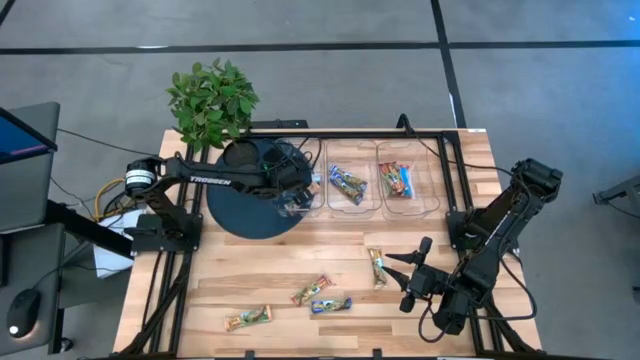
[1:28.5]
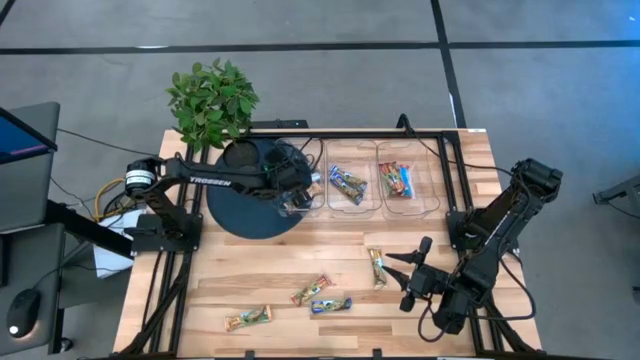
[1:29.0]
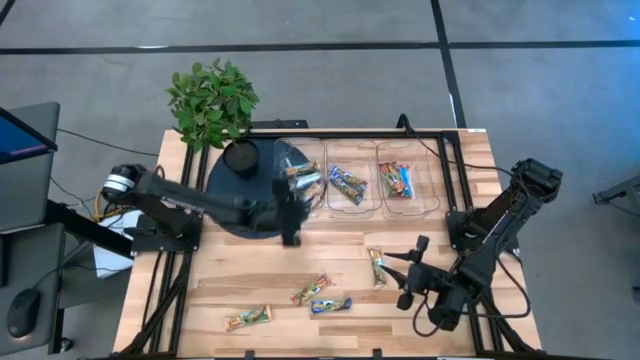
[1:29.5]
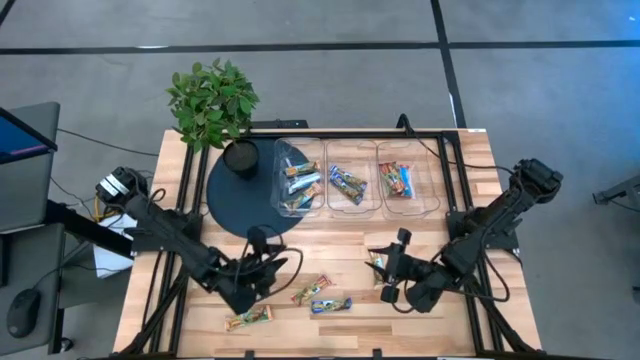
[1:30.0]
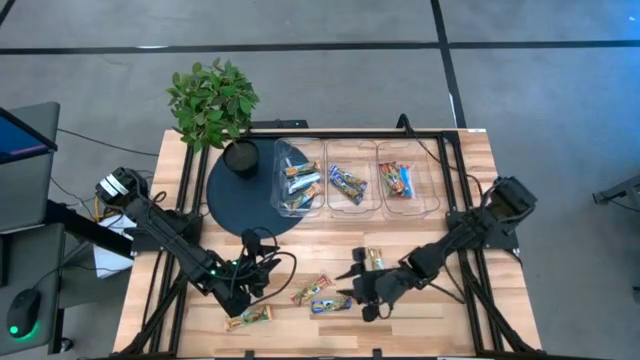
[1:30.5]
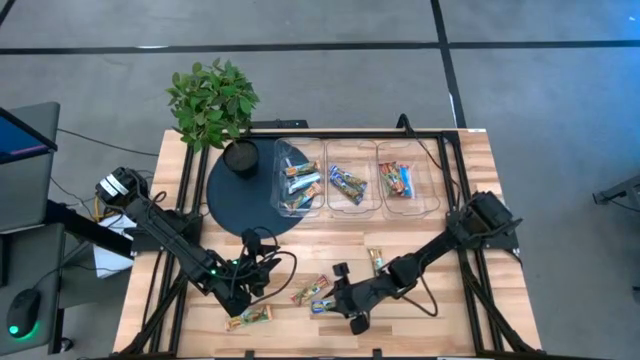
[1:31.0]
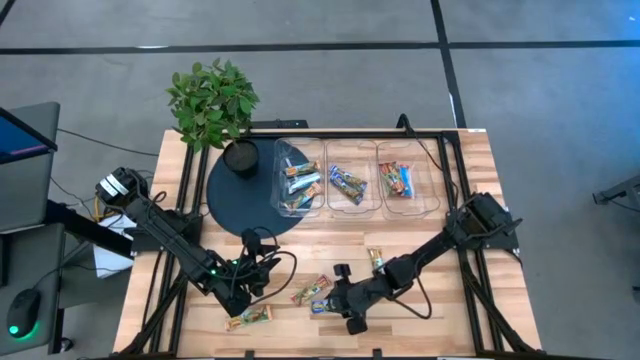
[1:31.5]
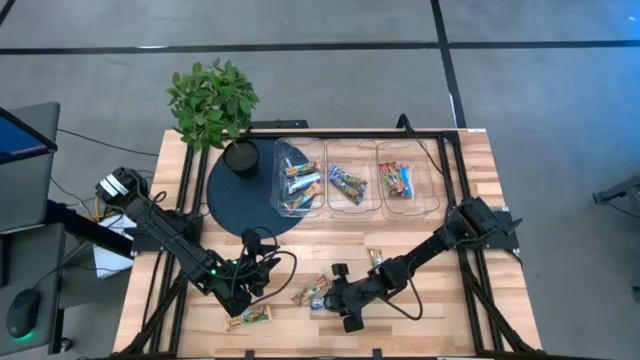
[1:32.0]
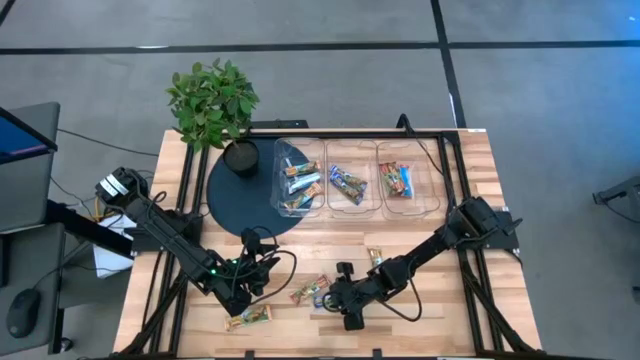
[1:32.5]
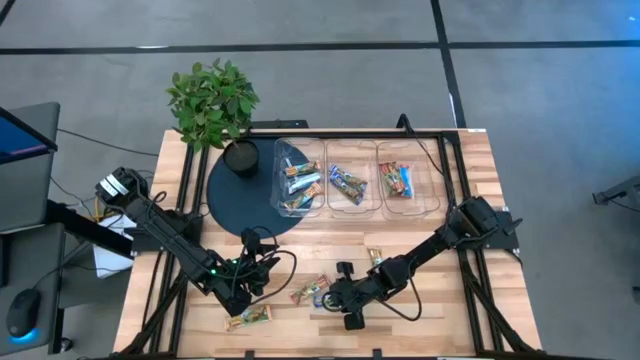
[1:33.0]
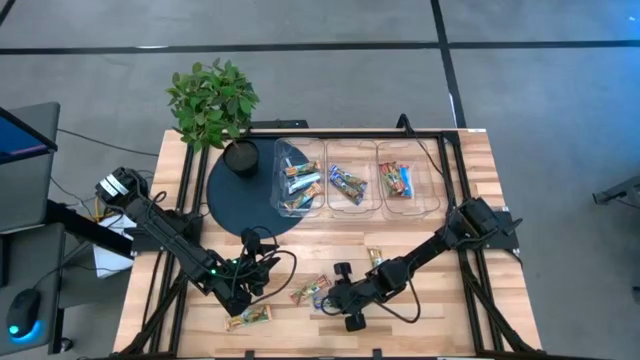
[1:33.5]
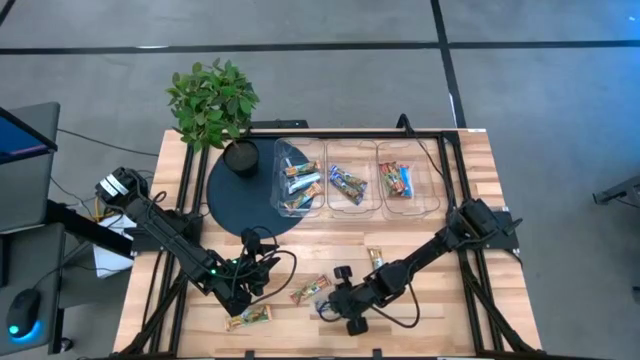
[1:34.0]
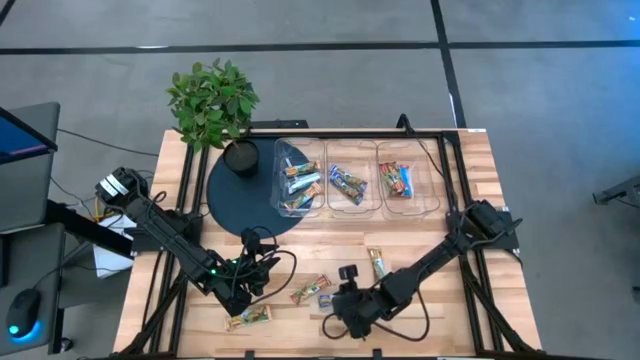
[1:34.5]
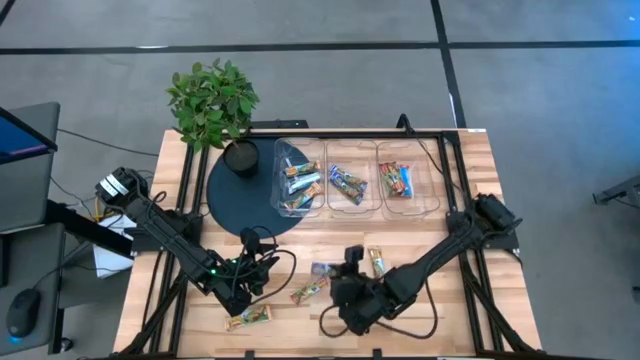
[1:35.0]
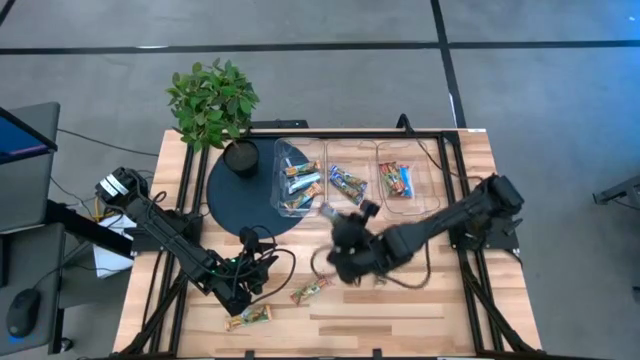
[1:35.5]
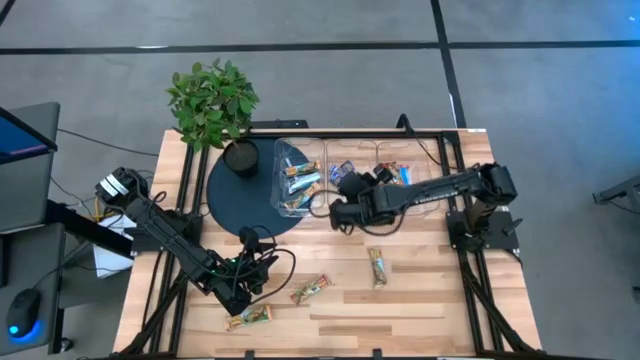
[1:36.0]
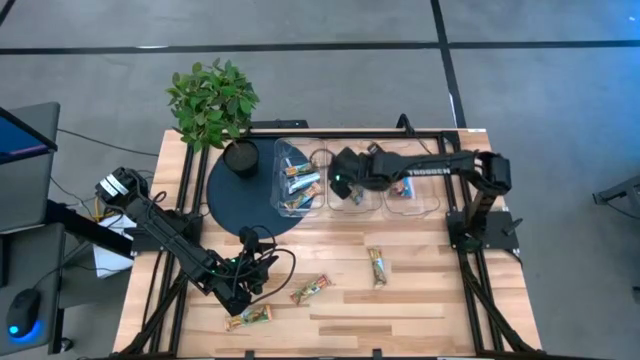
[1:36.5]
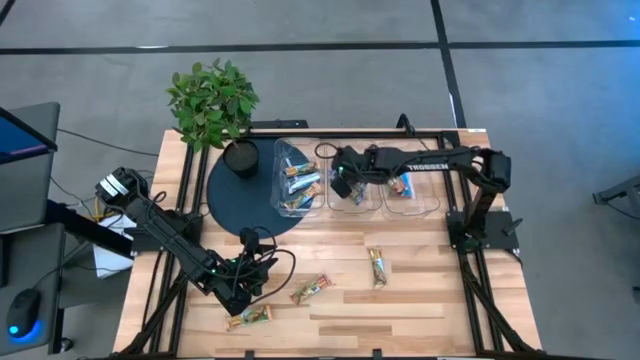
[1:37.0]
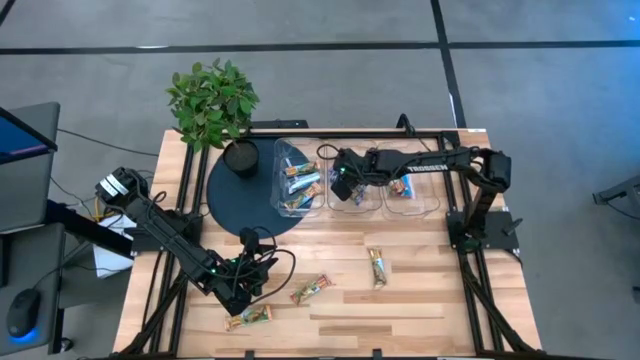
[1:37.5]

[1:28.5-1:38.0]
Task: Pick and place Granola Bars by type
Put the blue granola bar into the middle transparent bin

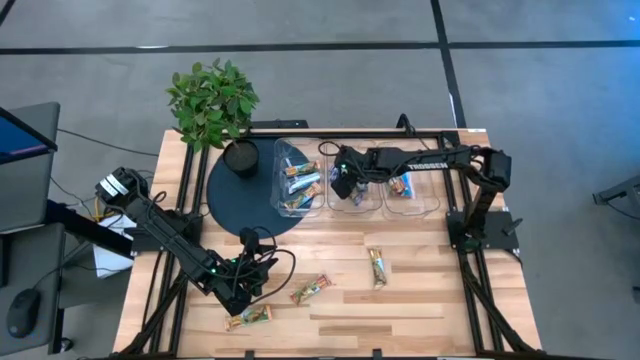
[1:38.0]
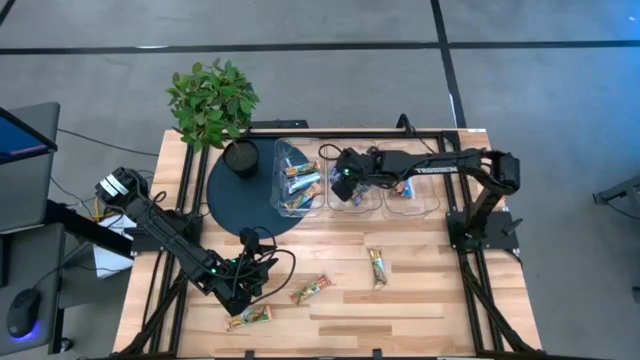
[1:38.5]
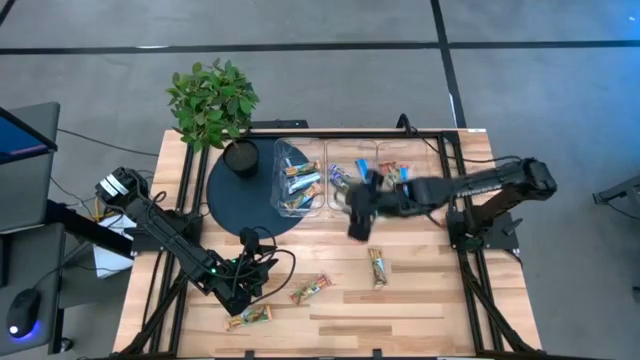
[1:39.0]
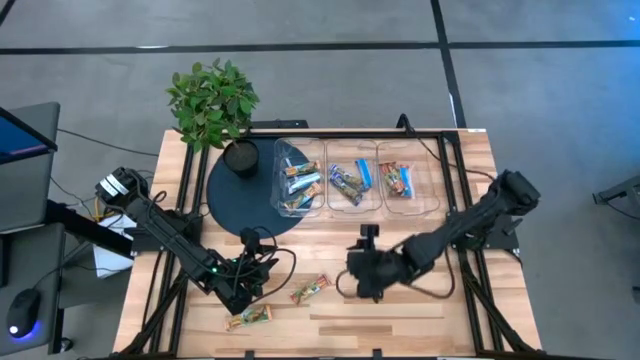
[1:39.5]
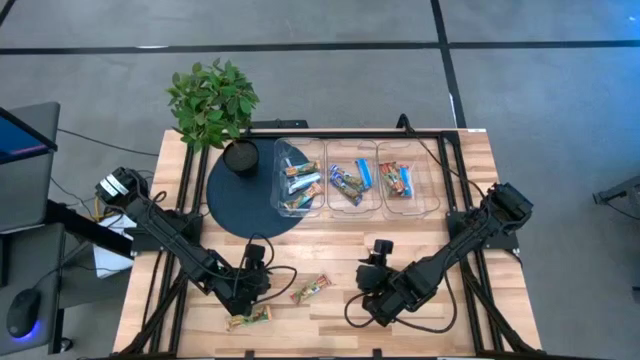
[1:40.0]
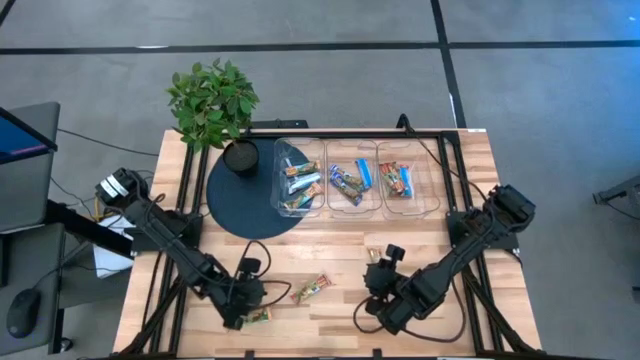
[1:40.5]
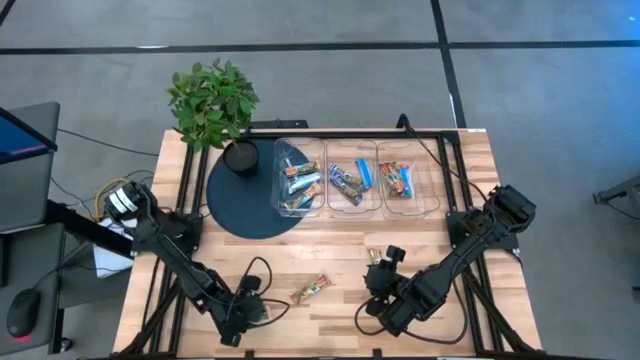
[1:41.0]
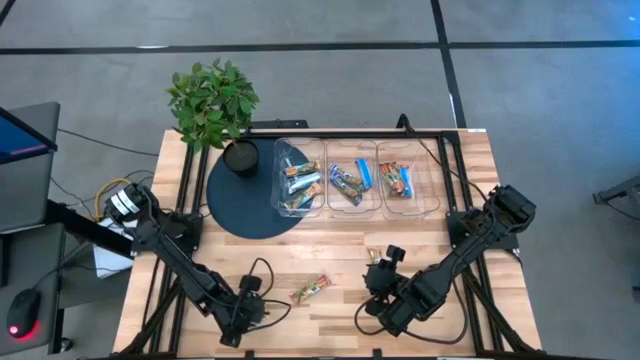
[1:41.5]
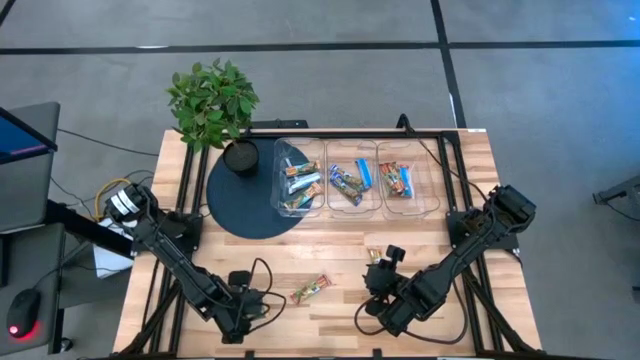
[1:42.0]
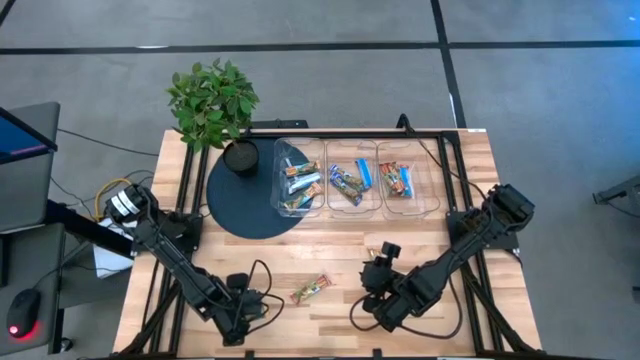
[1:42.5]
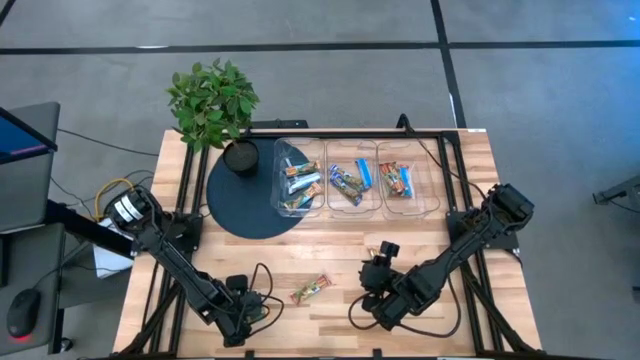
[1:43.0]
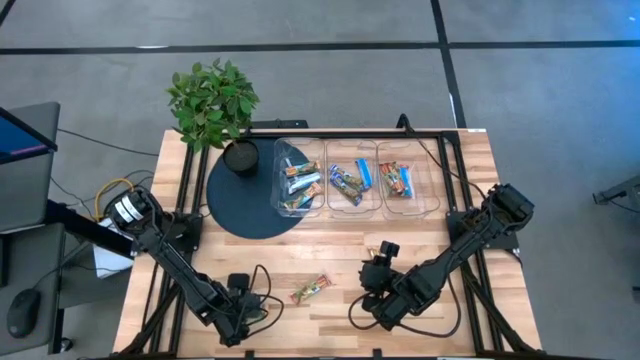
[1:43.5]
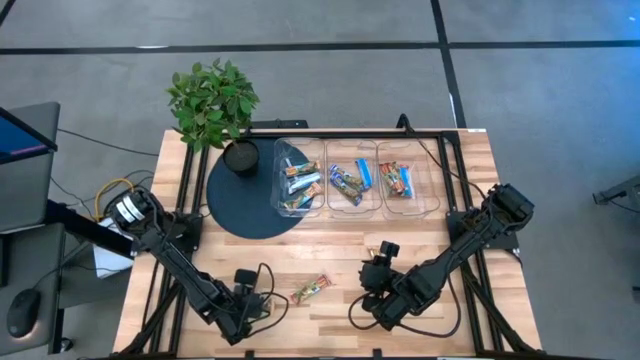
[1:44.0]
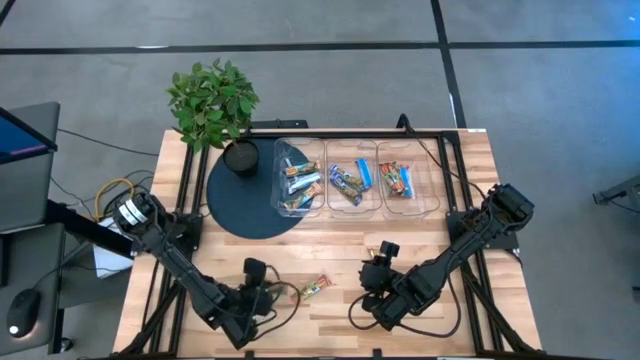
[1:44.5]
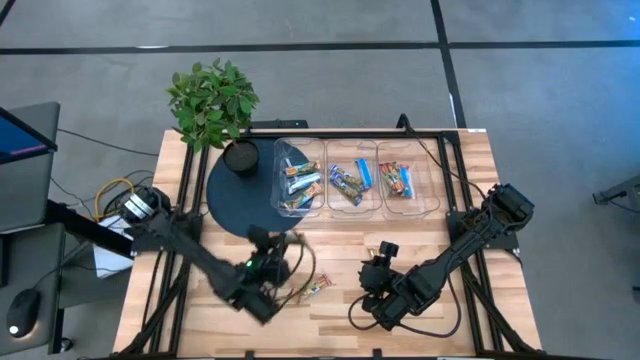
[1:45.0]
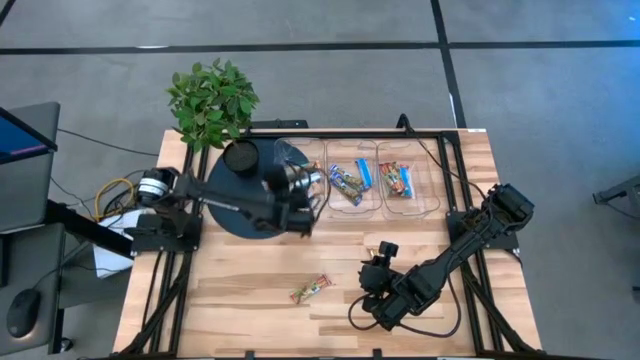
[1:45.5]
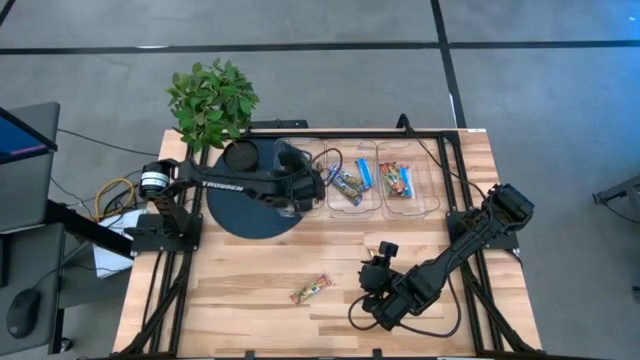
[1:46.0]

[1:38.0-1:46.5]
Put the yellow granola bar into the left transparent bin

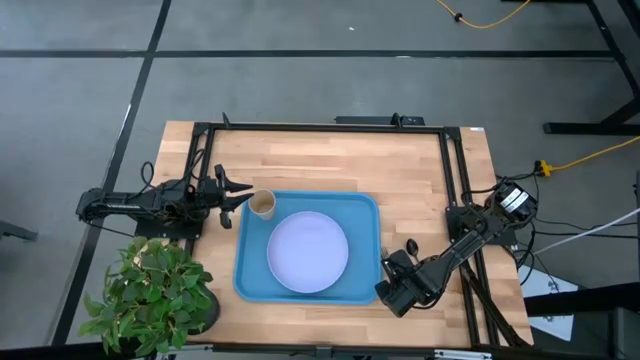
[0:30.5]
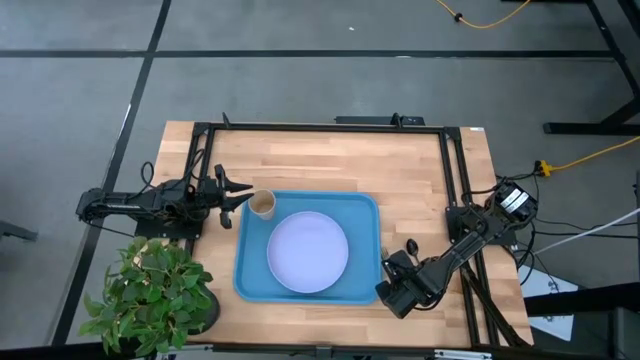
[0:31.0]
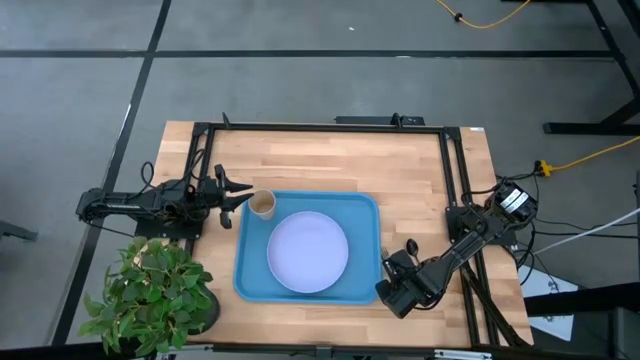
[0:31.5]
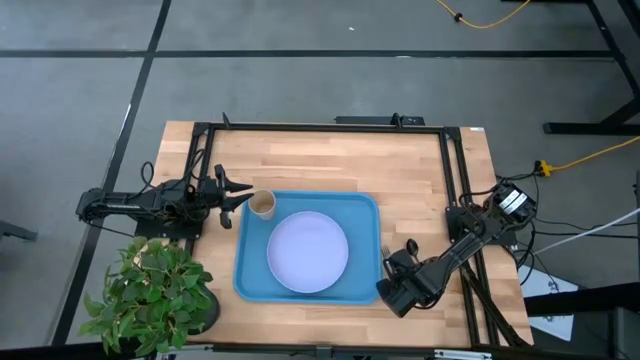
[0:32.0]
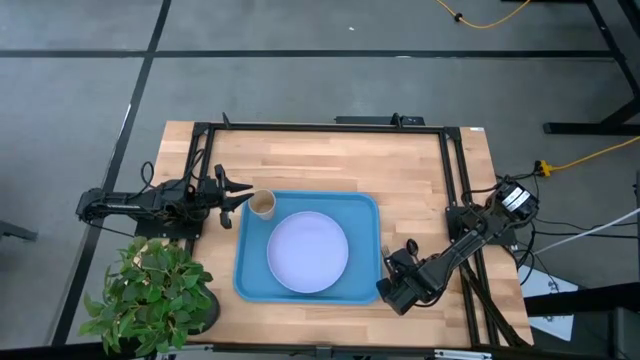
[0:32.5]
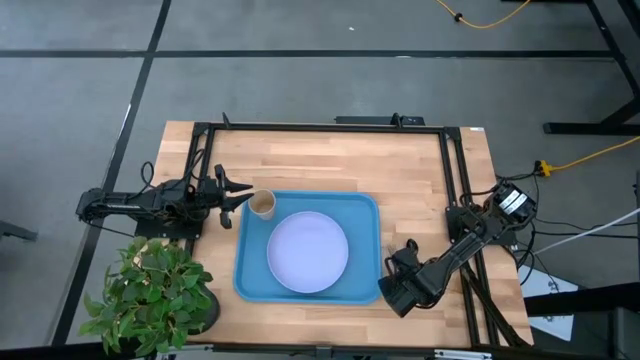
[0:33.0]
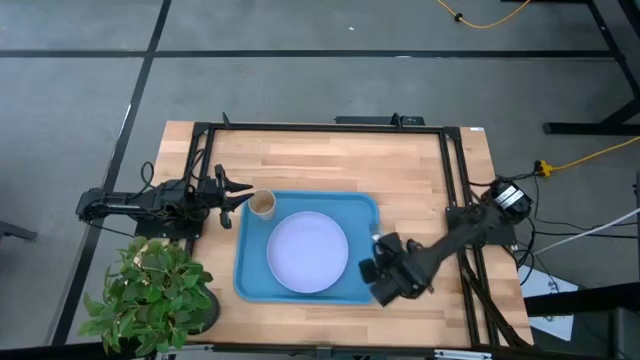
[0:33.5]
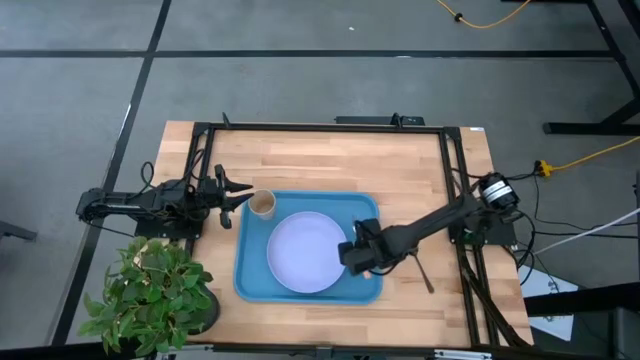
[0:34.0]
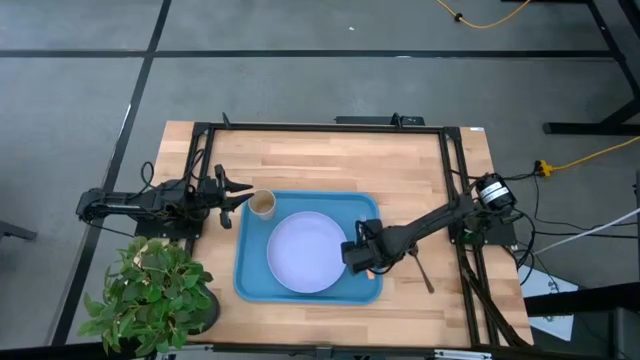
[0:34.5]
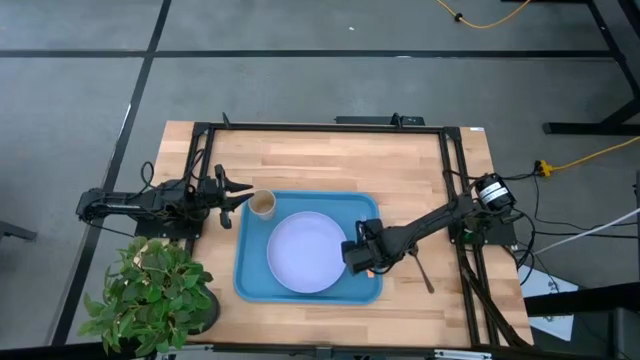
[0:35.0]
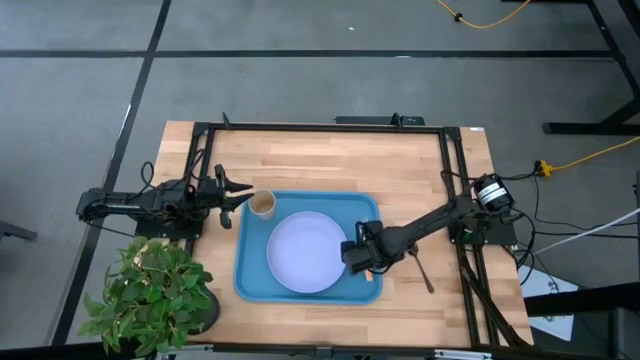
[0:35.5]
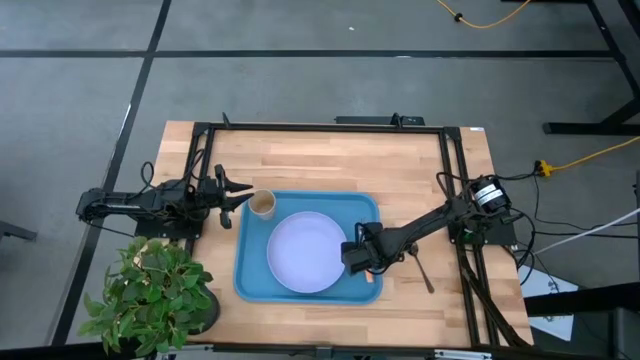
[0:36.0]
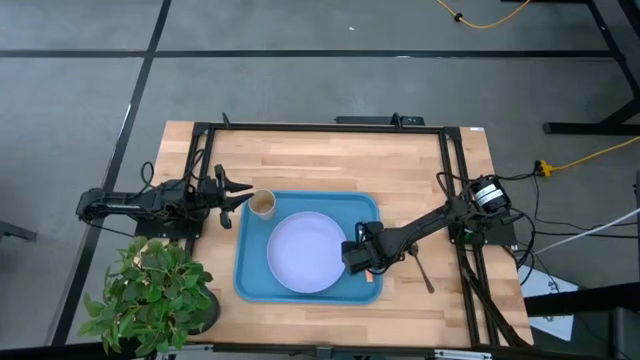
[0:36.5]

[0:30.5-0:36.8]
Task: Pick and place plate/cup/fork/spoon on tray
Put the yellow fork on the blue tray to the right of the purple plate
